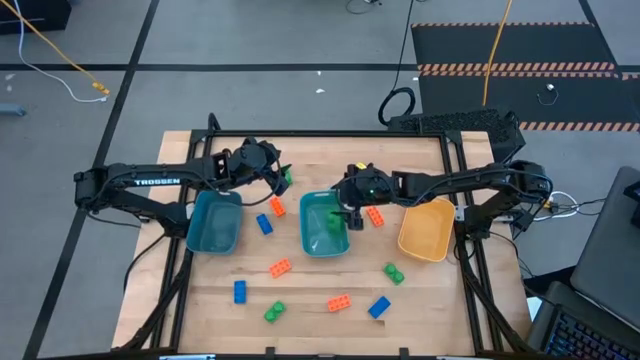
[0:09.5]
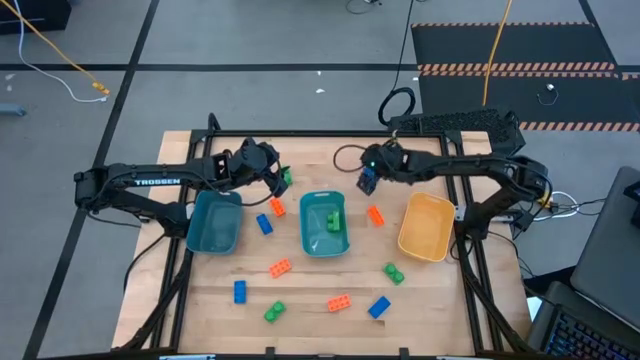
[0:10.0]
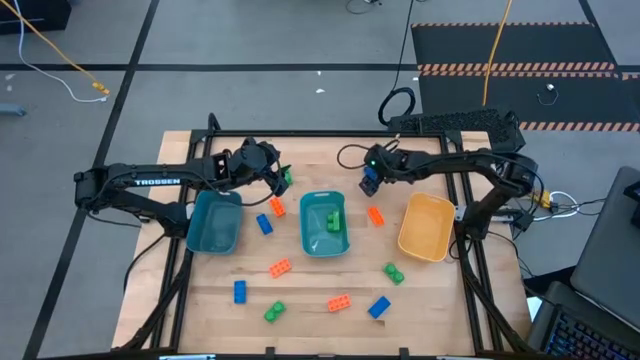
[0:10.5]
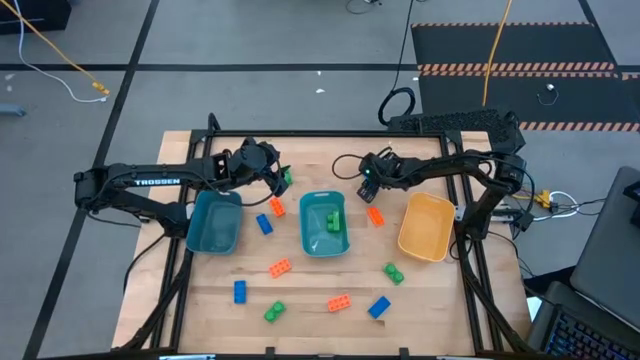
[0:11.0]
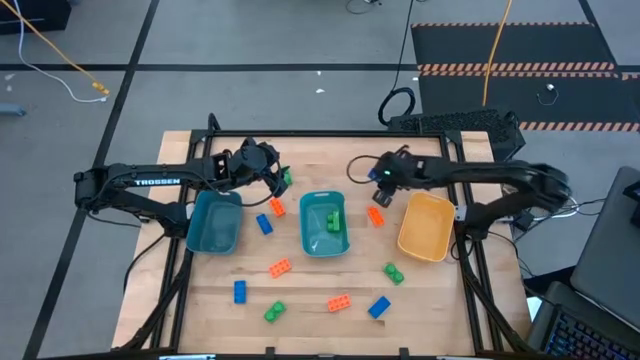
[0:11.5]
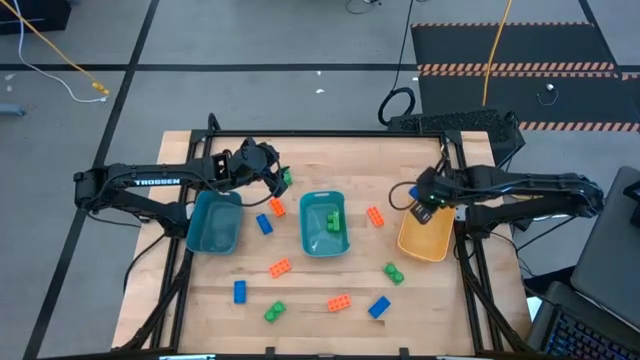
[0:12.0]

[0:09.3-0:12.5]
Task: Sort & place blocks by color
Put the blue game piece into the yellow bin

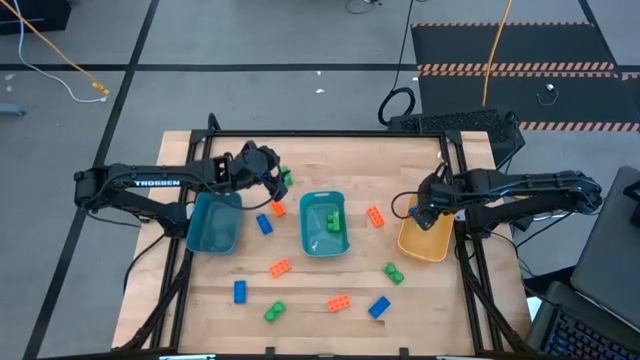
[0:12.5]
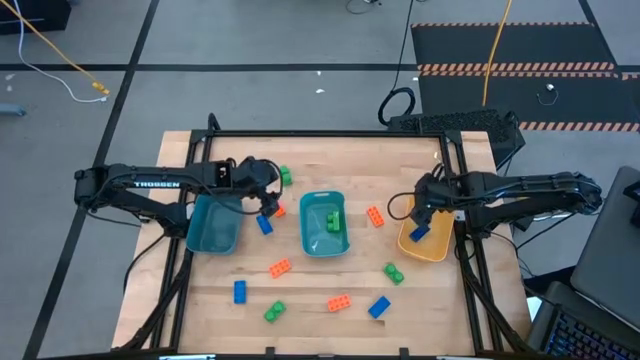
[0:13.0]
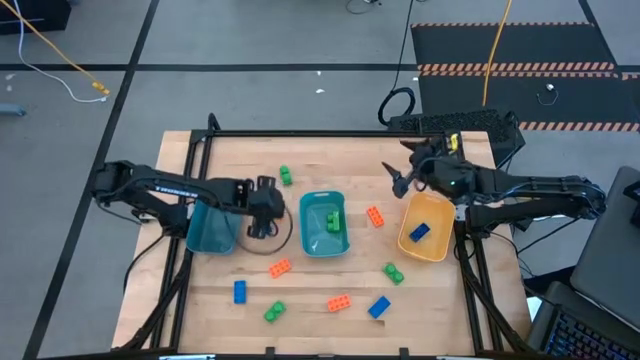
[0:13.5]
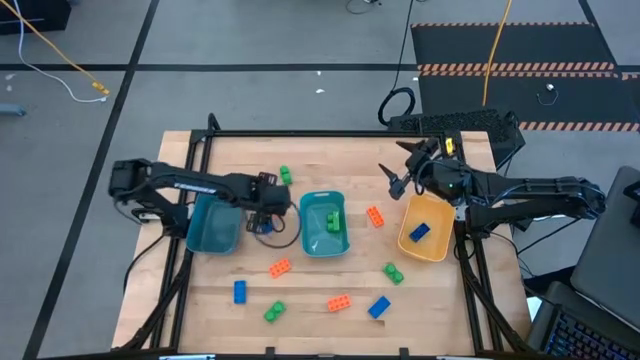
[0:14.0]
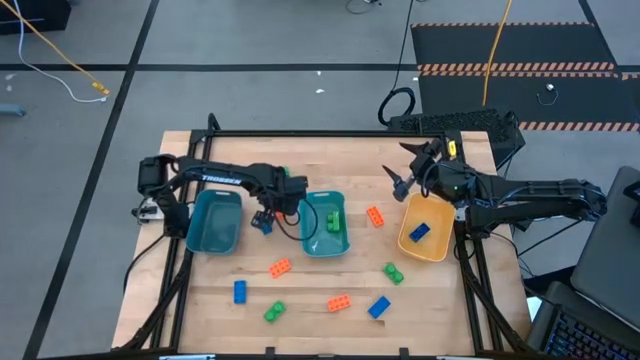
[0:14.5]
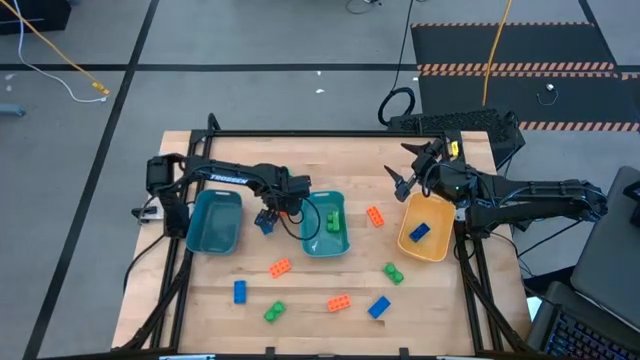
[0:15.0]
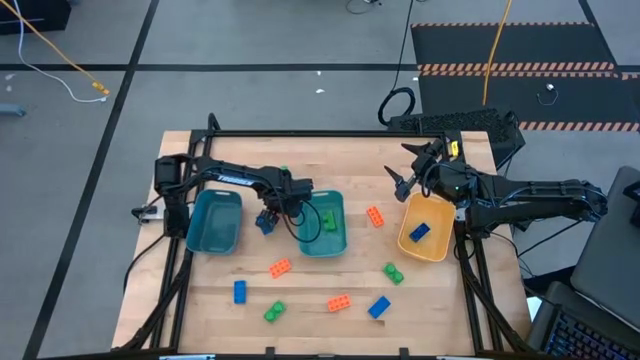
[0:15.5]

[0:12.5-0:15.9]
Put the orange game piece into the dark blue bin

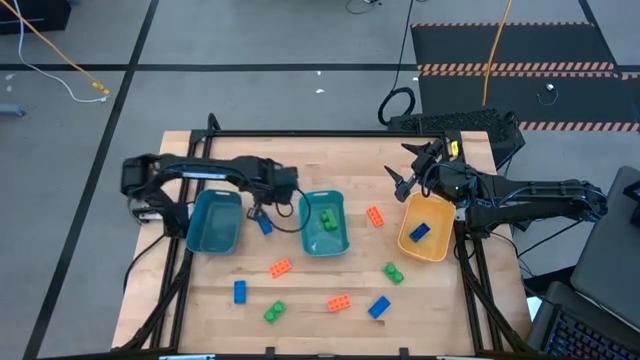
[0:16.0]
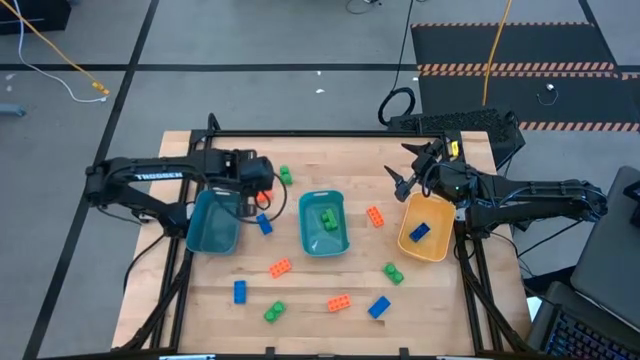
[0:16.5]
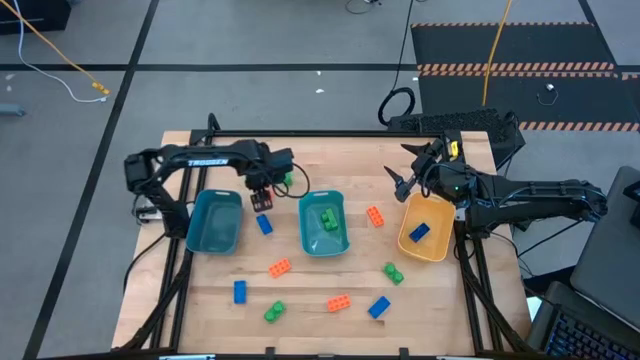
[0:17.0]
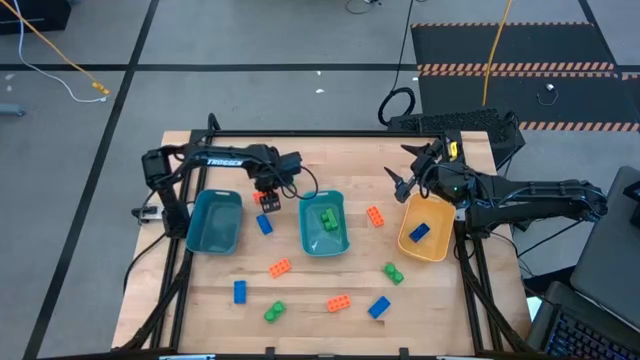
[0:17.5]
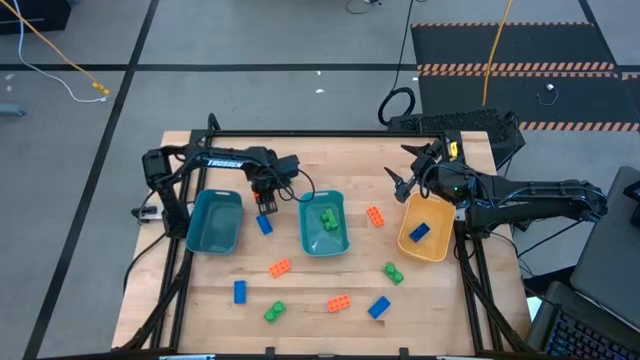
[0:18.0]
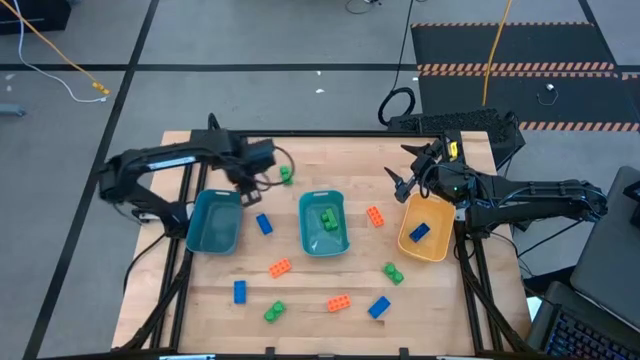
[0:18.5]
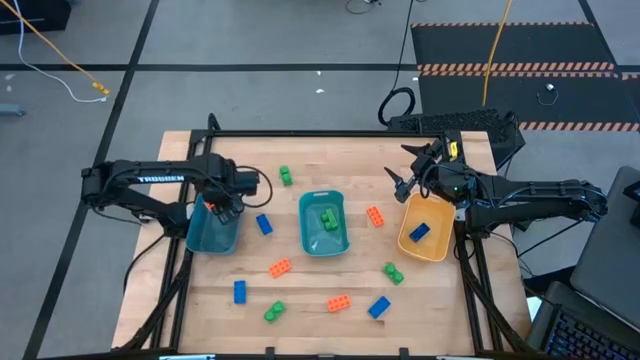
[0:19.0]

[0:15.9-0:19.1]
Put the orange game piece into the dark blue bin

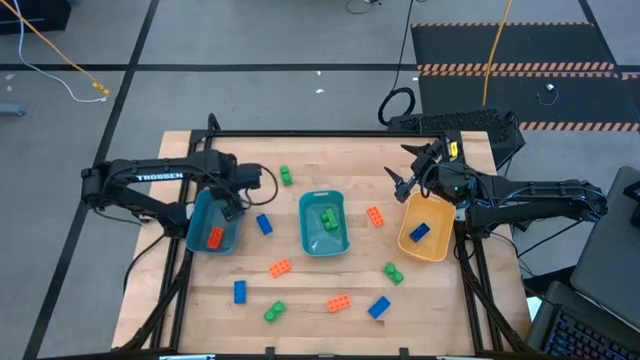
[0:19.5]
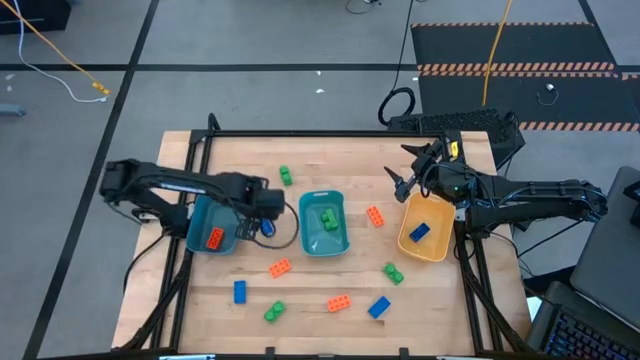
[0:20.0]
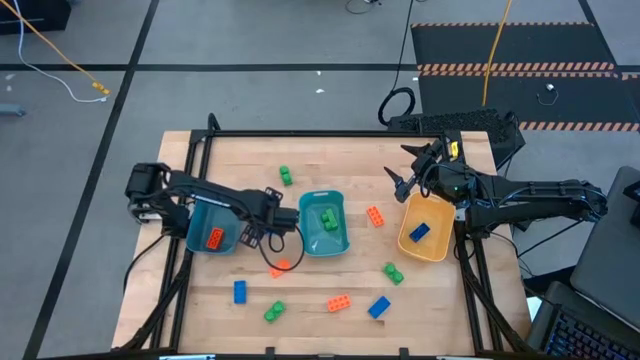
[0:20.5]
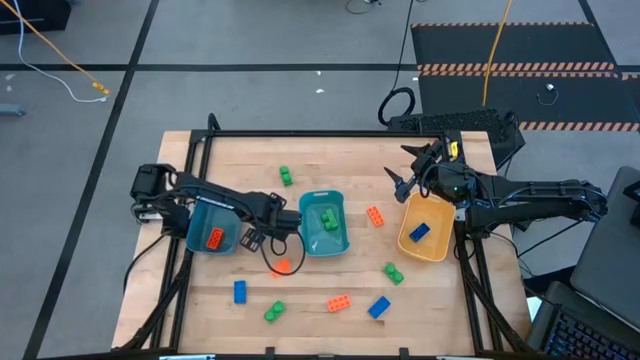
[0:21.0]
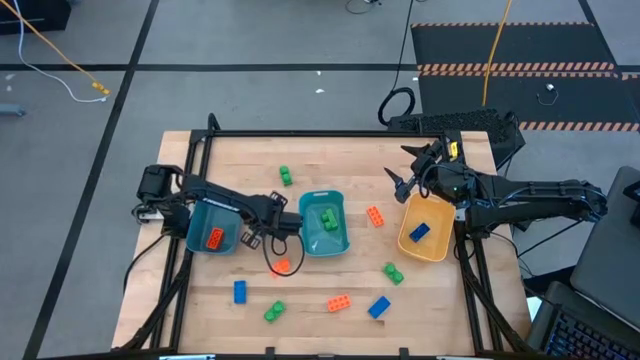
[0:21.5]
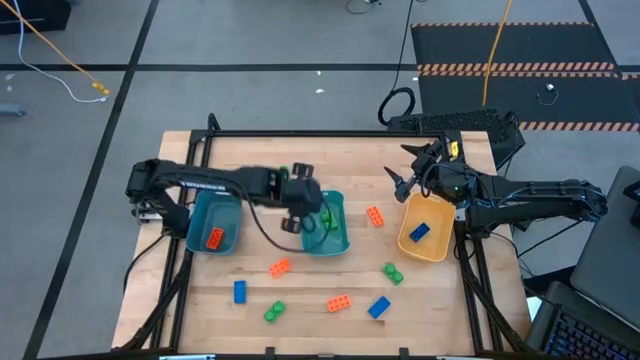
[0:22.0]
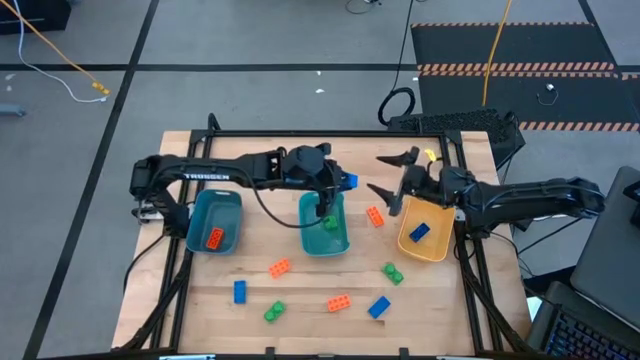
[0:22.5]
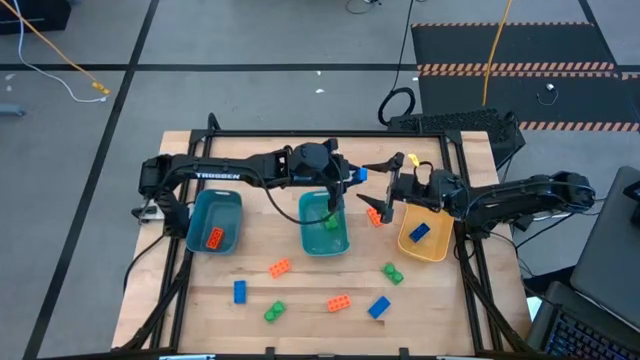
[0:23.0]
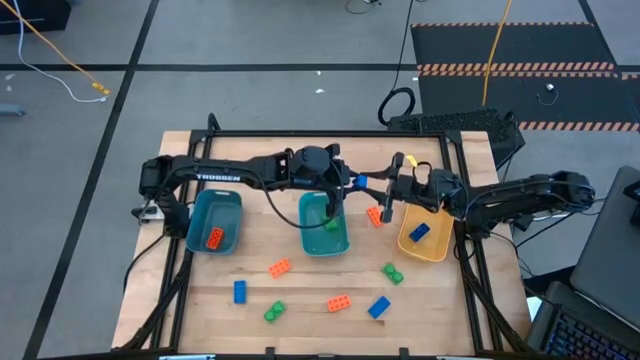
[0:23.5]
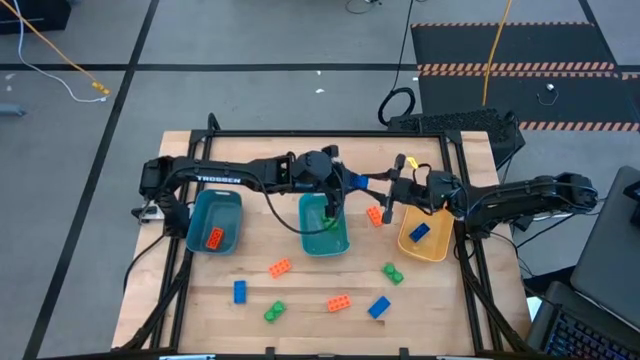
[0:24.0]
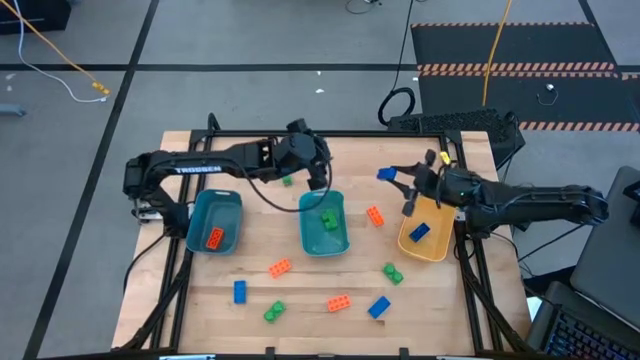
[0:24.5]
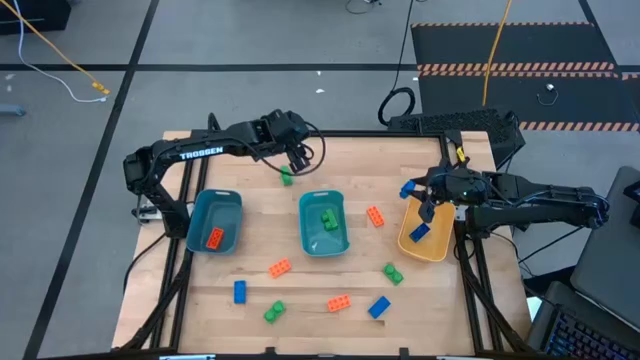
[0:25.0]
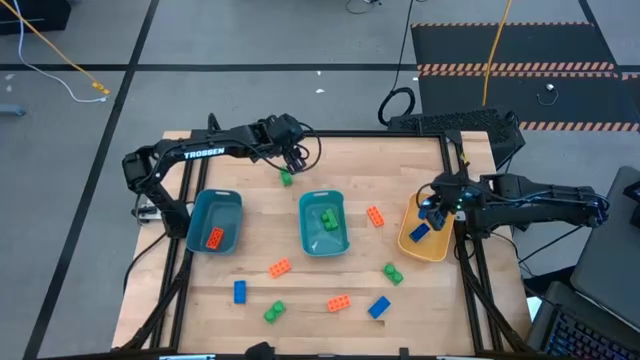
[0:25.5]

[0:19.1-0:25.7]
Put the blue game piece into the yellow bin

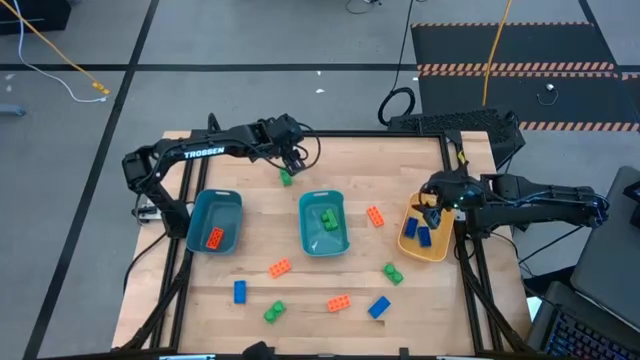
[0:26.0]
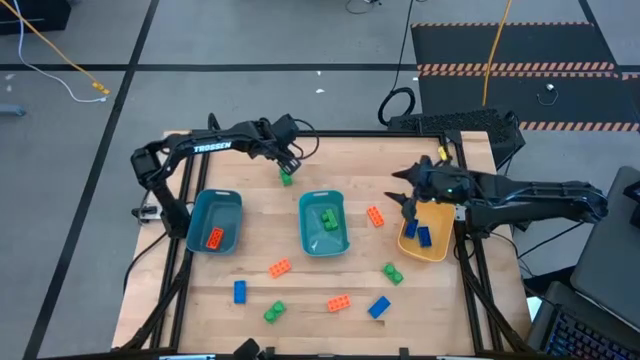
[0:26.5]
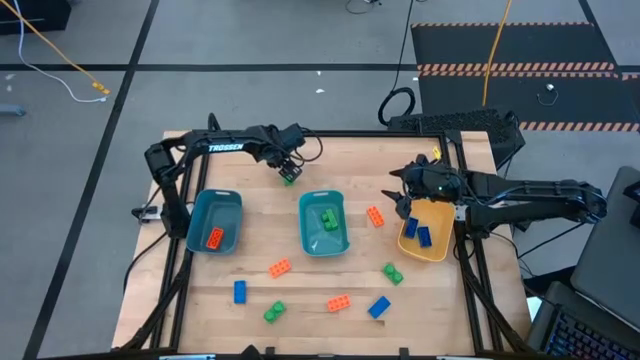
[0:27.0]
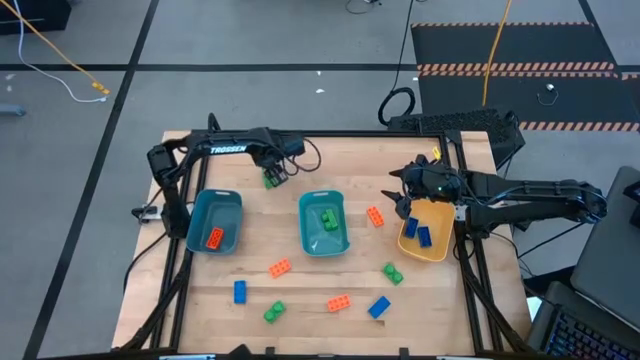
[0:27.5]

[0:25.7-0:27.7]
Put the green game piece into the light blue bin

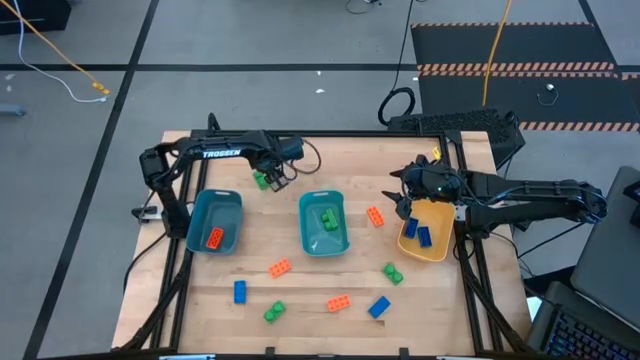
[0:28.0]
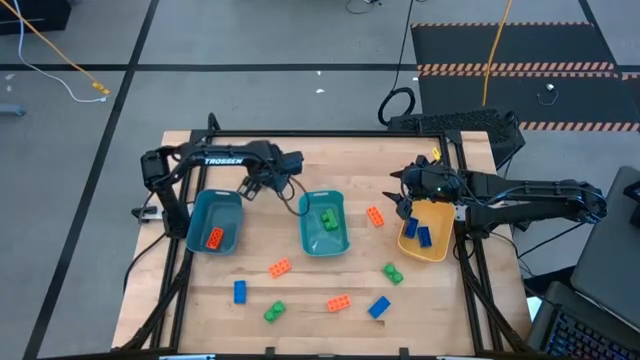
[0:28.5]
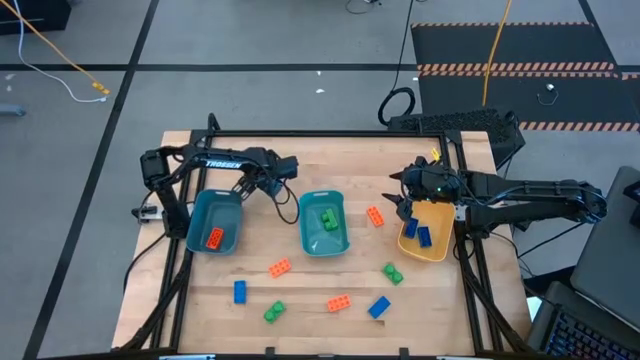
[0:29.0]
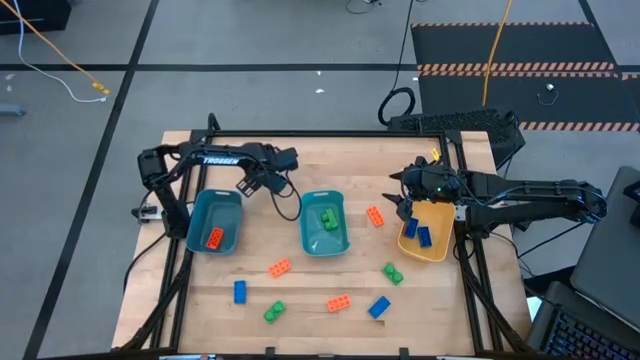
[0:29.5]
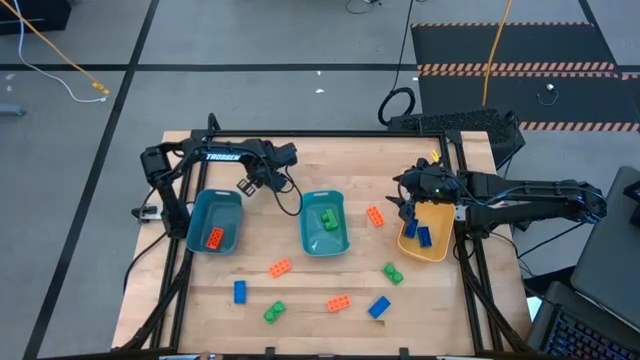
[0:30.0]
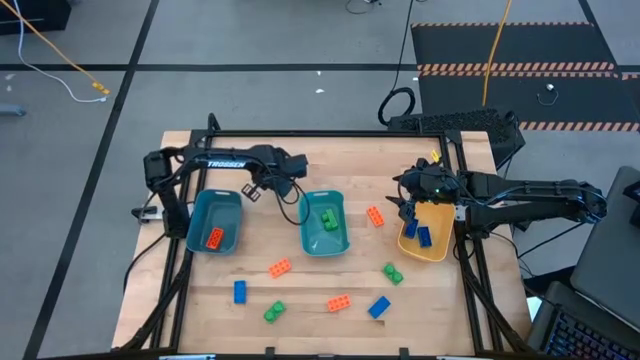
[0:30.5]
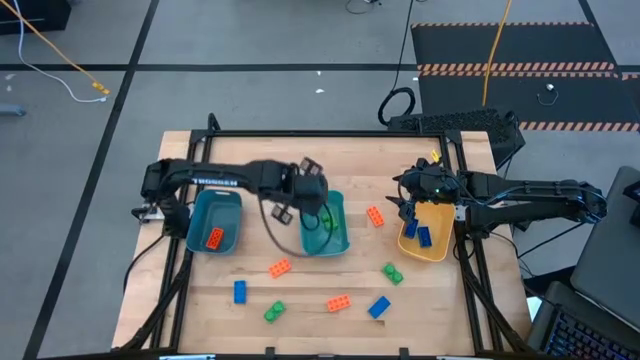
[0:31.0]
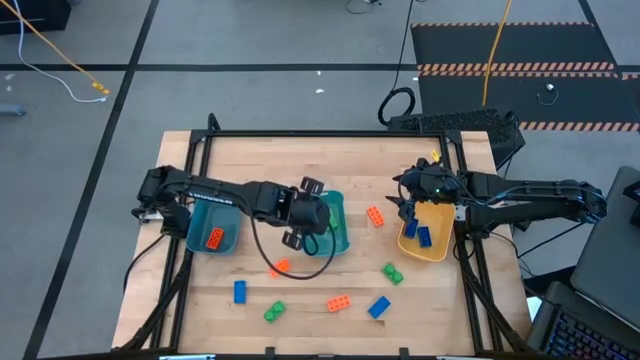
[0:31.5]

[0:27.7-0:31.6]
Put the green game piece into the light blue bin
